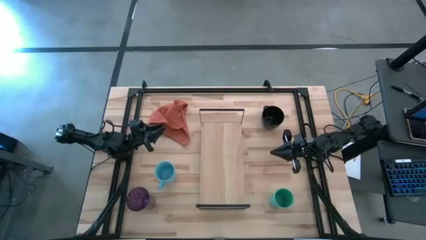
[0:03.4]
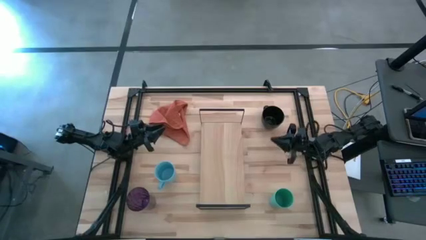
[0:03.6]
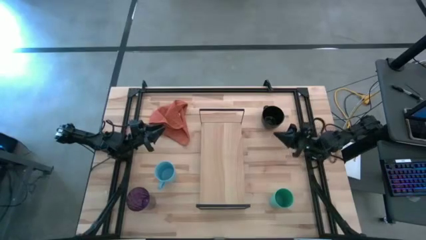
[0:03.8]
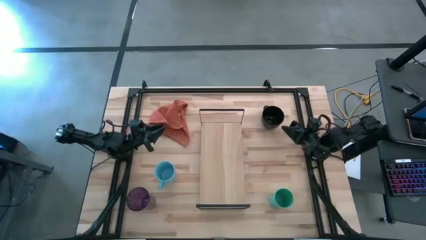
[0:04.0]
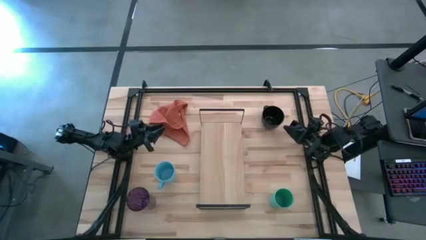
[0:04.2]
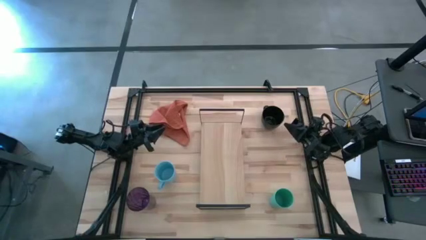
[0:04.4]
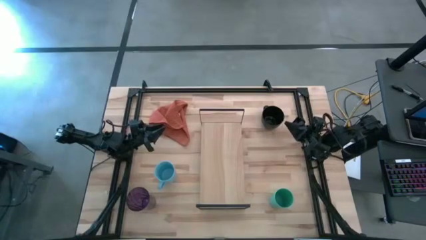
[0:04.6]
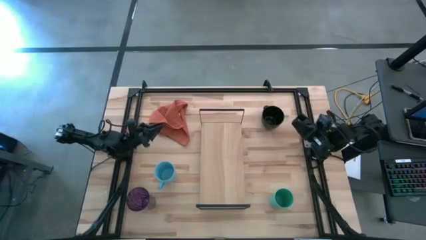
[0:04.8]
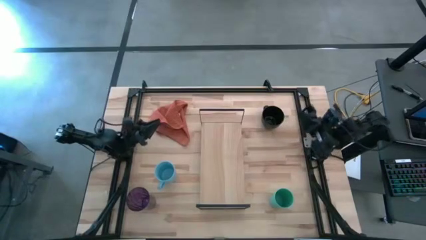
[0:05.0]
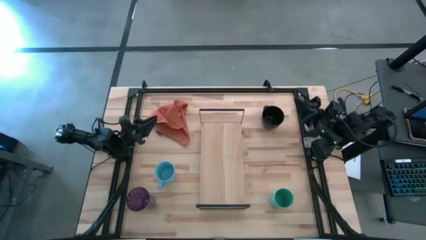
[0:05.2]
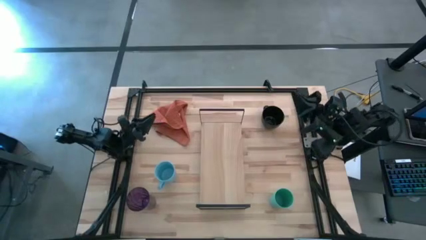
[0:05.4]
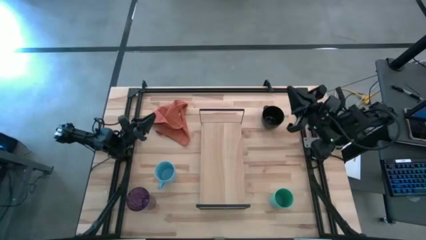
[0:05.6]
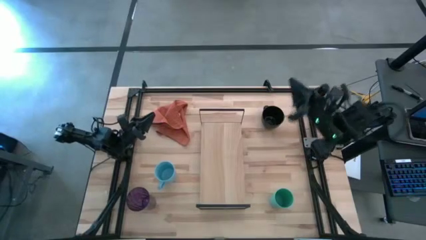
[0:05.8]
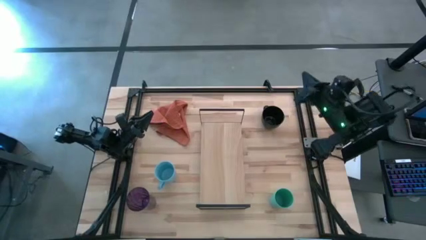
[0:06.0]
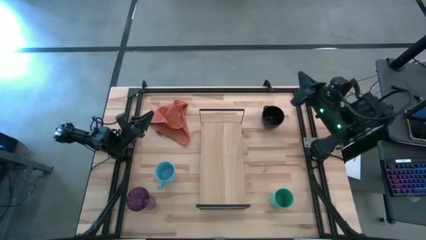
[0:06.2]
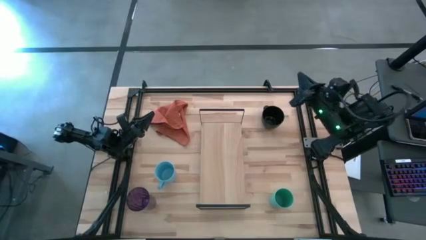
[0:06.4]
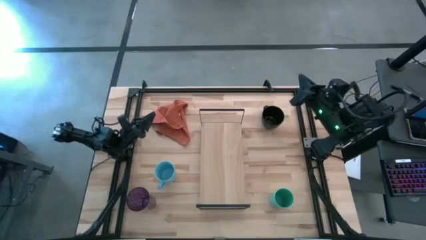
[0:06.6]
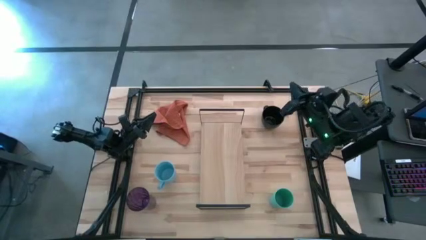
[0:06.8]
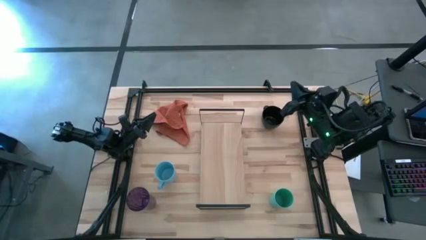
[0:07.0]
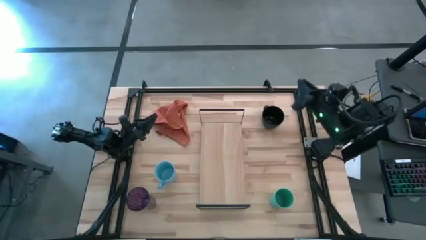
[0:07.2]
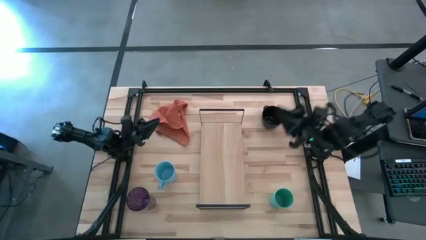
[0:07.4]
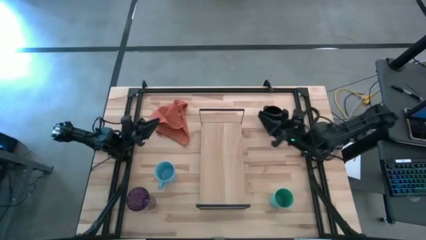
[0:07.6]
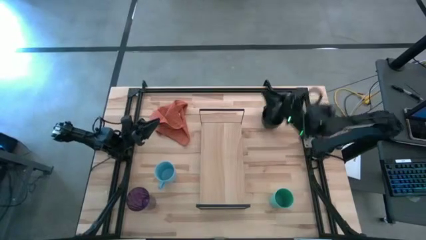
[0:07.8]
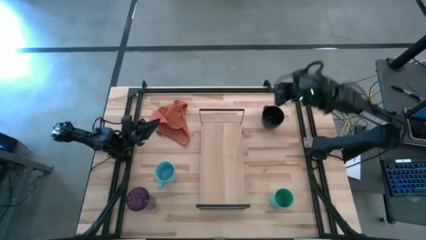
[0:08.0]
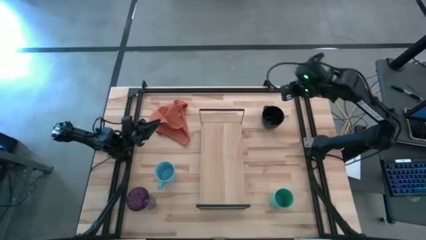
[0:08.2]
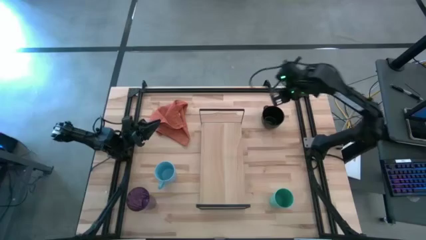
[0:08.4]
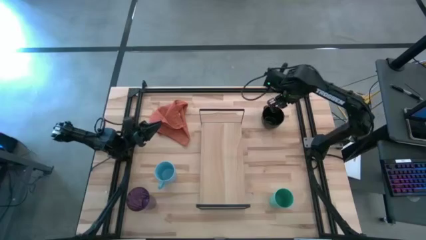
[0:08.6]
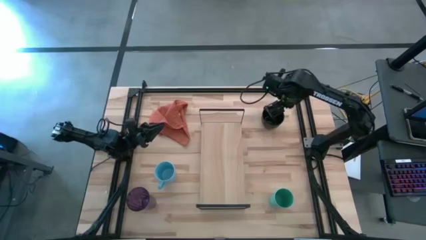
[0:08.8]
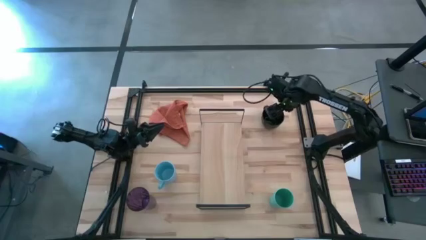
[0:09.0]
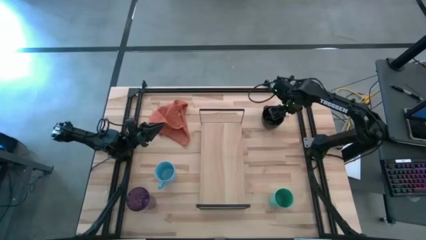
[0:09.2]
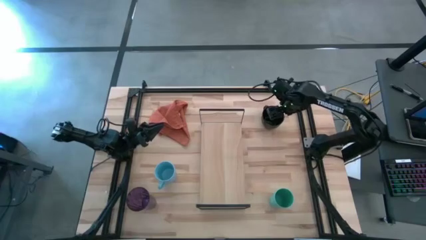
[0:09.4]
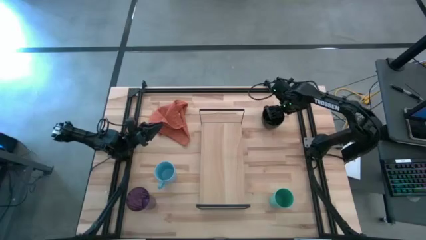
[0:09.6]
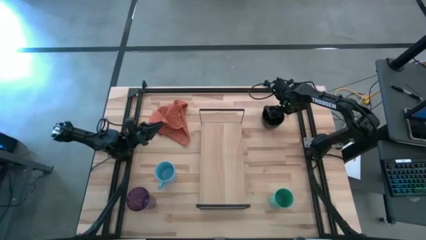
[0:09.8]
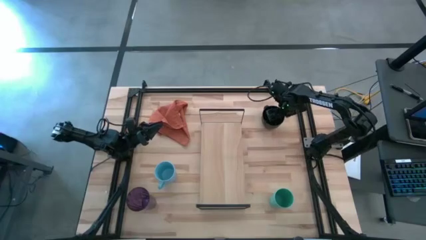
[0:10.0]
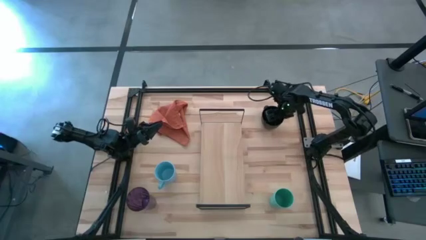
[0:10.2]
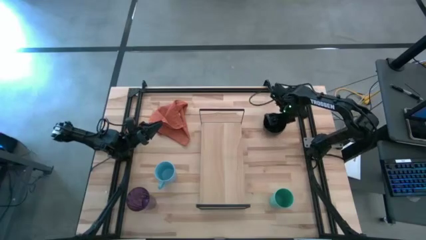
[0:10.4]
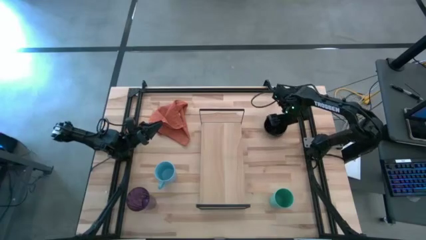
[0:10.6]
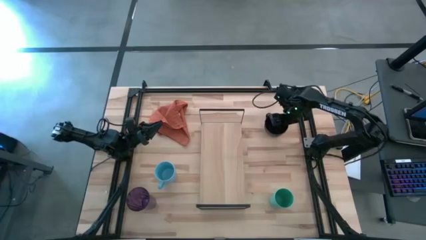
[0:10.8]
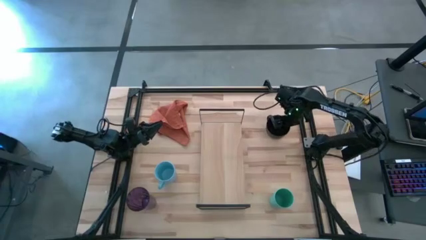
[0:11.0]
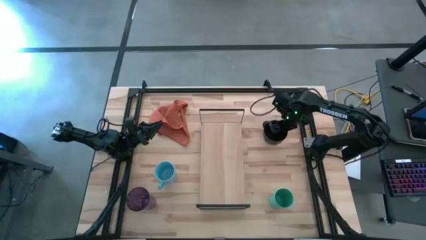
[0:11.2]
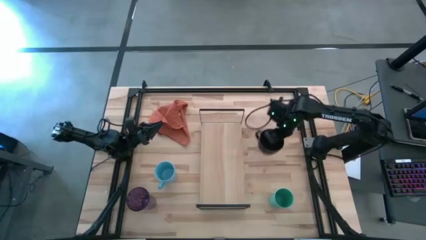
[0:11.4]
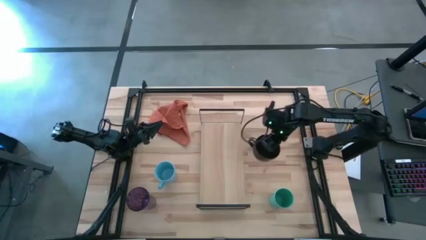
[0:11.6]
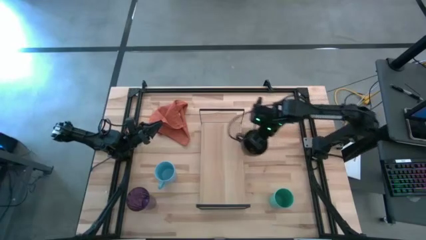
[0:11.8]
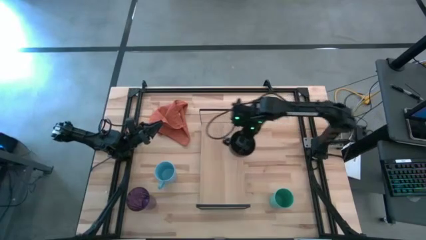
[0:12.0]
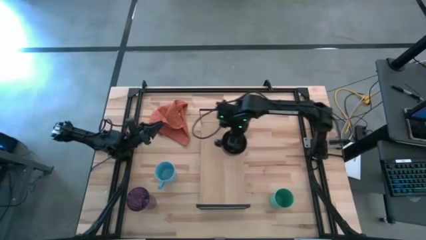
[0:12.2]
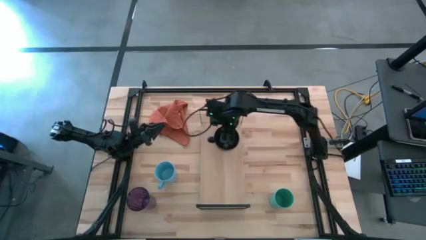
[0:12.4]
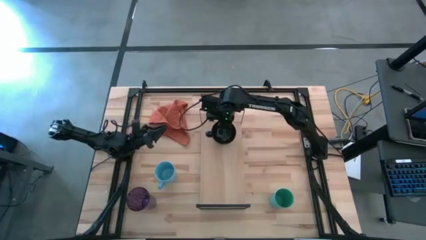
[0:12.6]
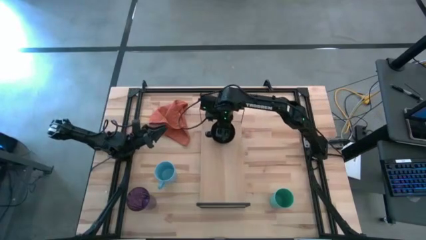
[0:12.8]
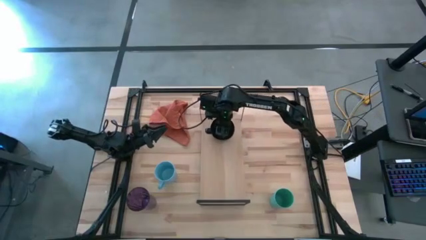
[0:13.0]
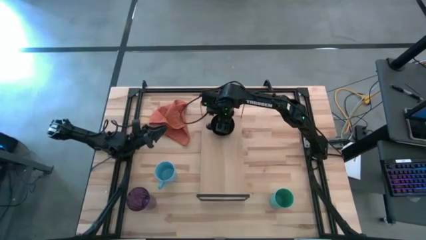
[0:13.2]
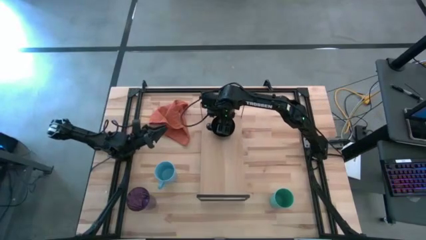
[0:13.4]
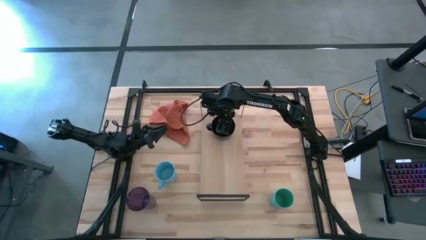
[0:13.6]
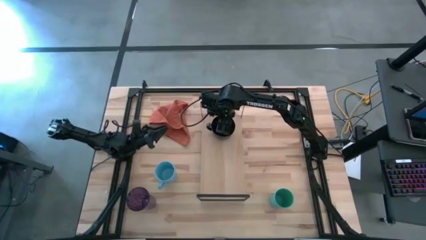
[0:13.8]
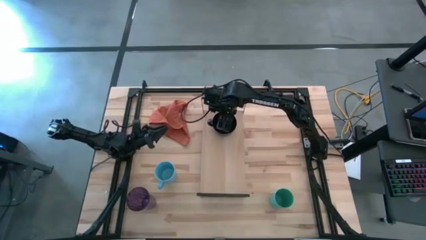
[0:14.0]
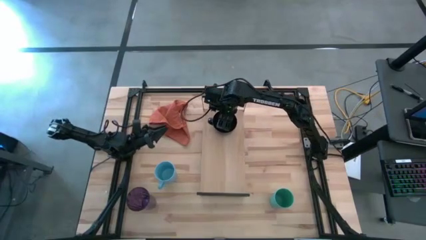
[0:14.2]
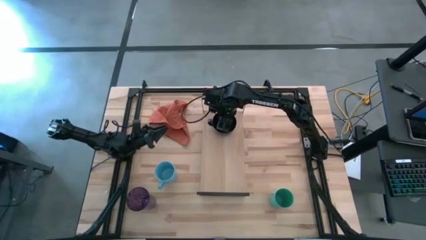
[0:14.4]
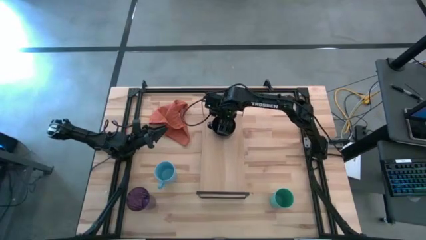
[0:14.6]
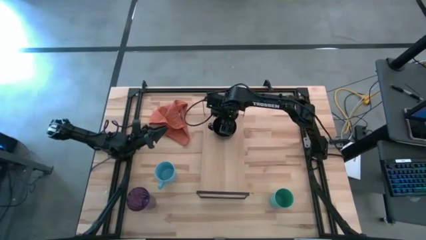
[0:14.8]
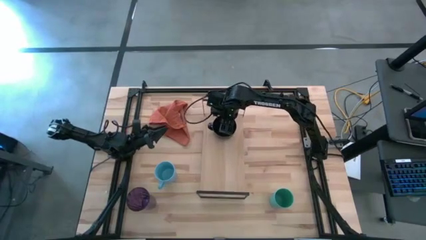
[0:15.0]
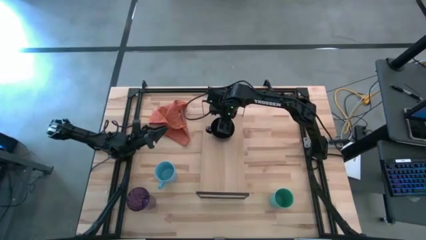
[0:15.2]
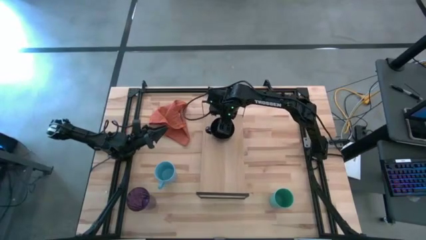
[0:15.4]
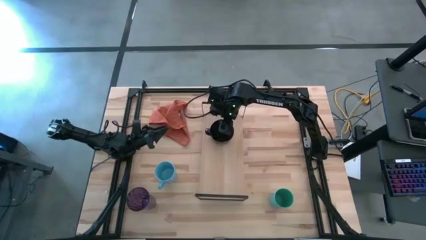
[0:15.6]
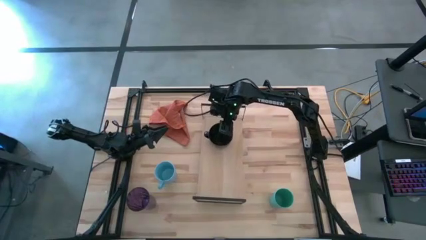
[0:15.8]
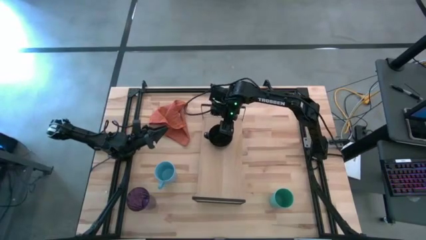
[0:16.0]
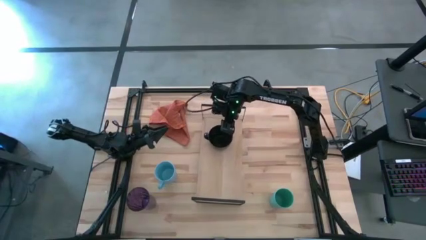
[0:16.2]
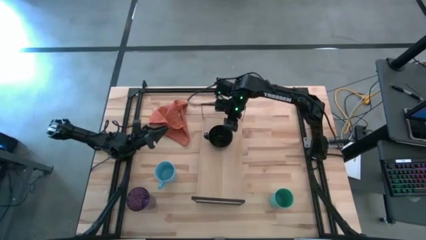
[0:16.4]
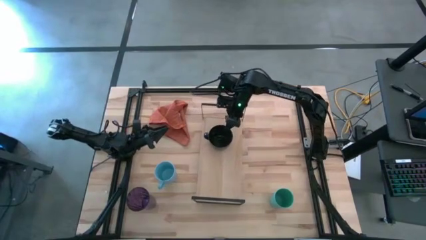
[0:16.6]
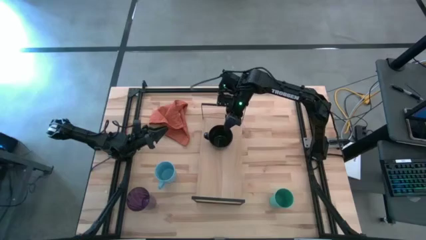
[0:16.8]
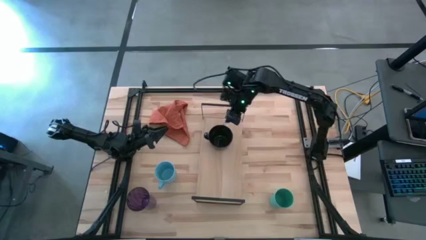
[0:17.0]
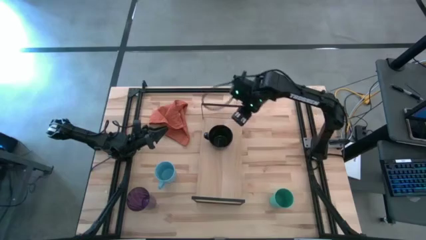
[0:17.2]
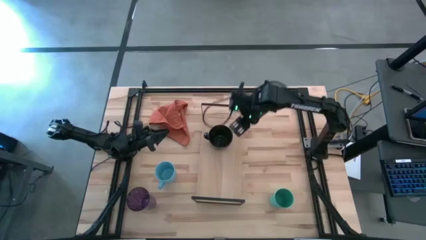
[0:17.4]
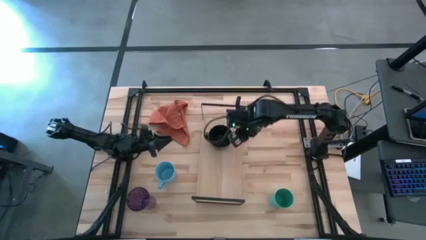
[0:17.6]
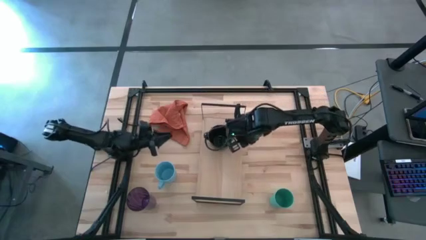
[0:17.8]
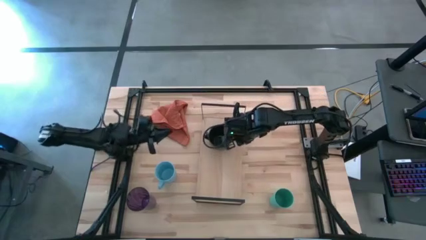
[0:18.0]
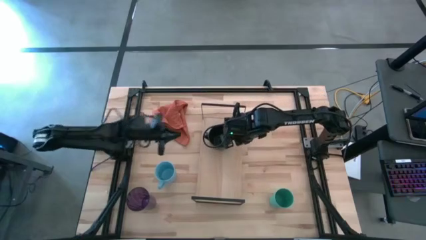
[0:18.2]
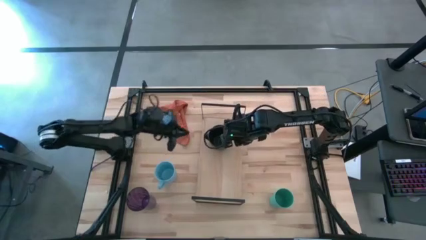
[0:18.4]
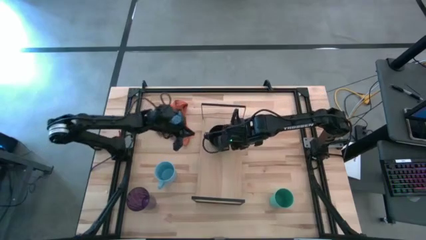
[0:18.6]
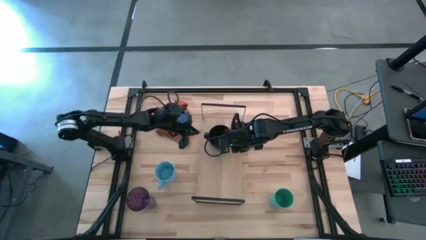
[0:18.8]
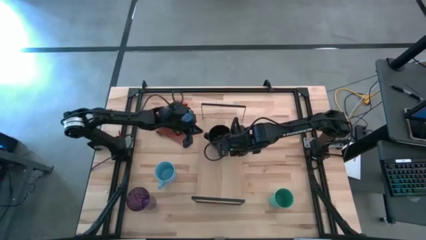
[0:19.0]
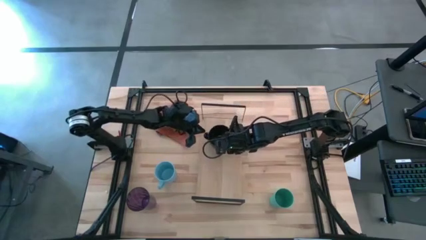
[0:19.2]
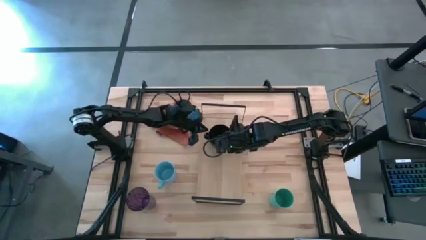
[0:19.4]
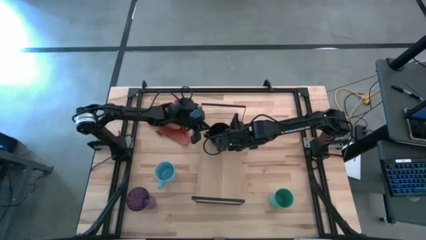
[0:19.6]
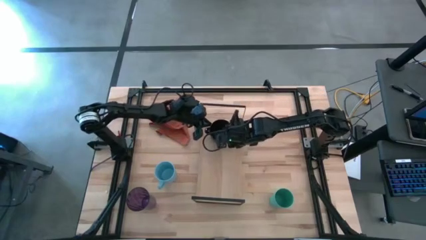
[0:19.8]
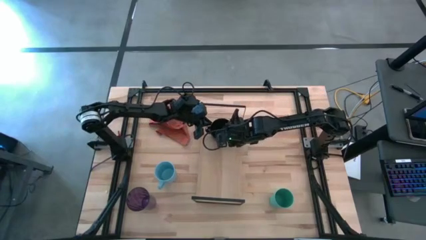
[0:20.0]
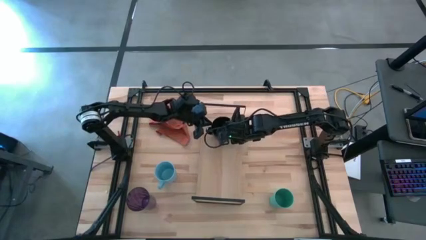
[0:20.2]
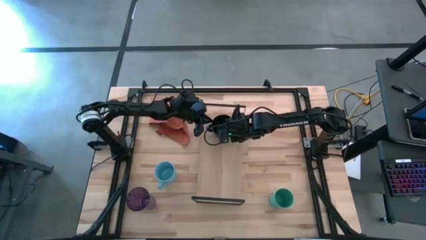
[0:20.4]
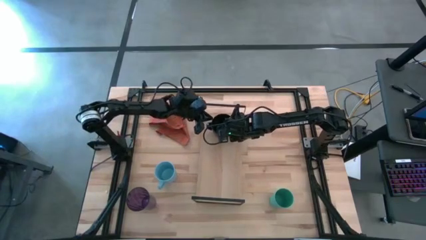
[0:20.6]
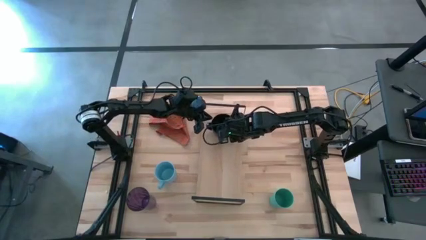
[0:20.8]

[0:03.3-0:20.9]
Task: Stack small to large cups/mugs on shelf
Put the black mug on the shelf
